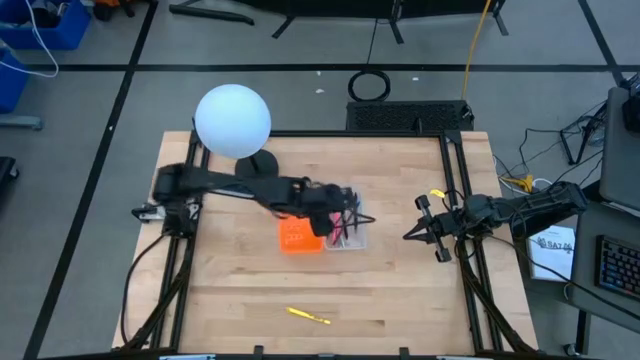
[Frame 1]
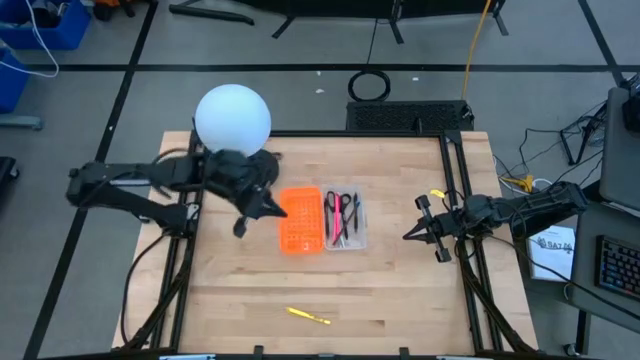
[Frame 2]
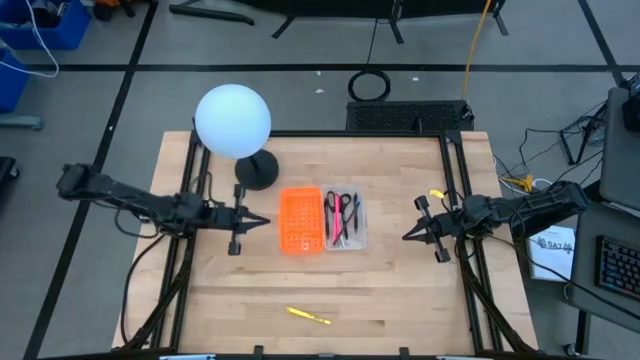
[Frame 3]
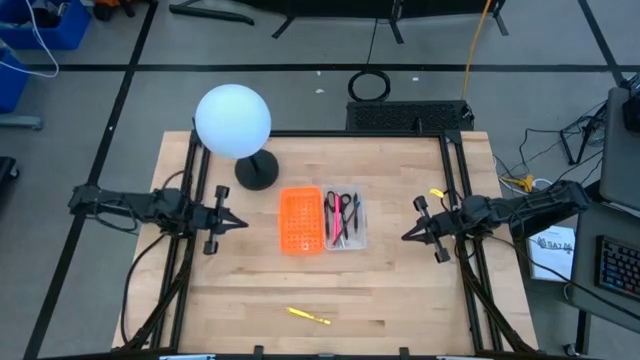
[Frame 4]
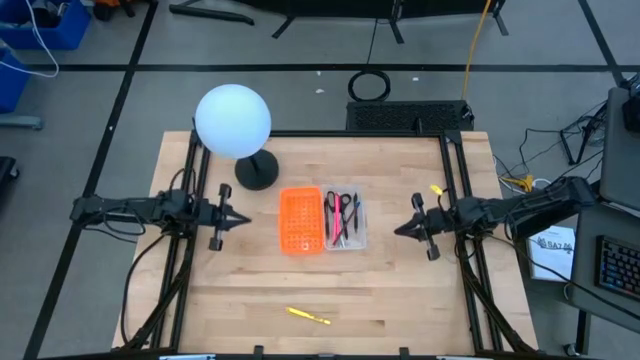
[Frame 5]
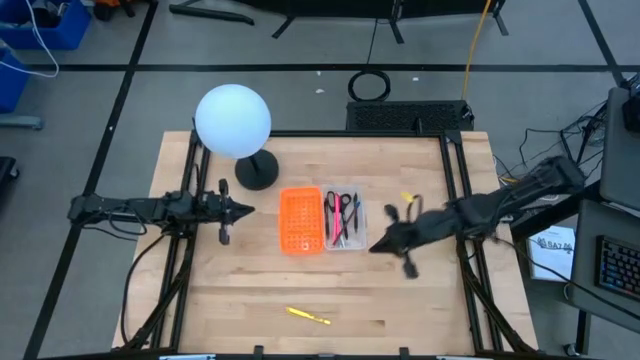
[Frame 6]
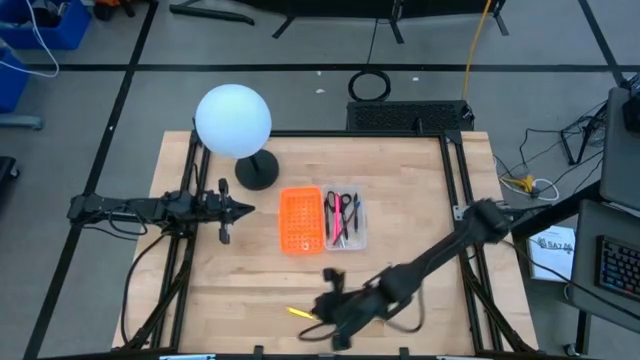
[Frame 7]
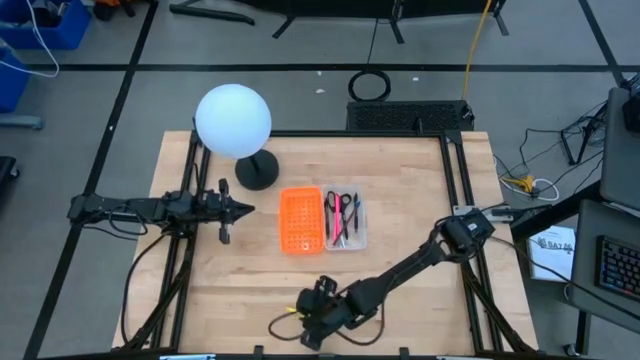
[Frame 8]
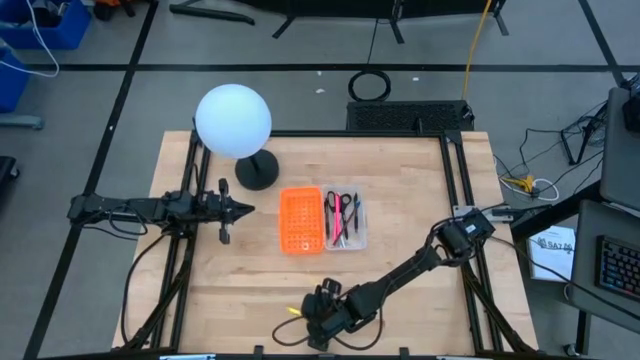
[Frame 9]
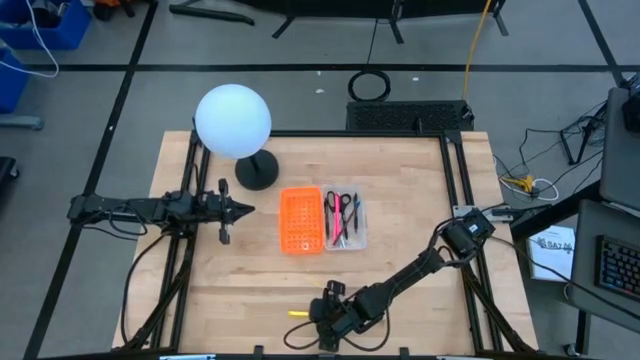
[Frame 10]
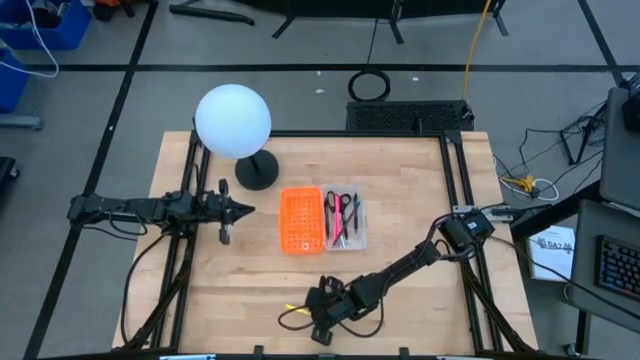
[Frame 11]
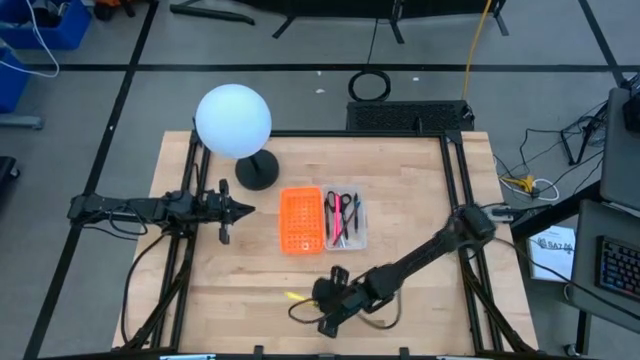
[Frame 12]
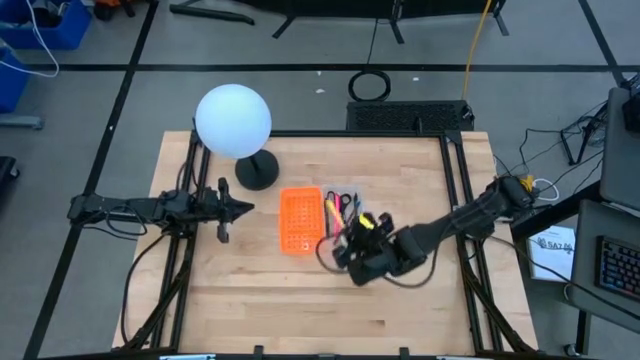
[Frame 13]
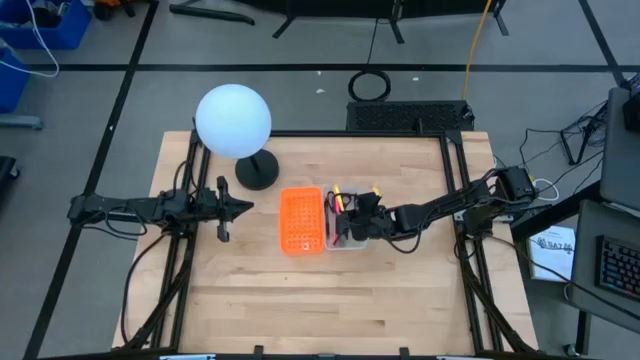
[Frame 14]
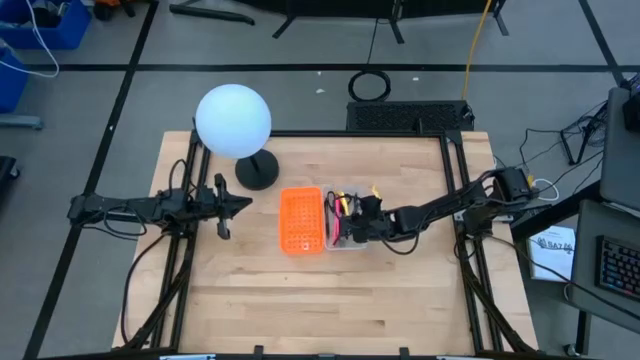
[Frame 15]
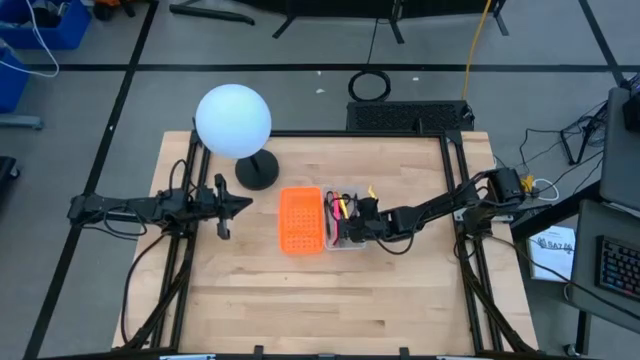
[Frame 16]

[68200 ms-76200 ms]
Task: Pick & place school supplies into a supply box
Put the yellow pen into the orange supply box

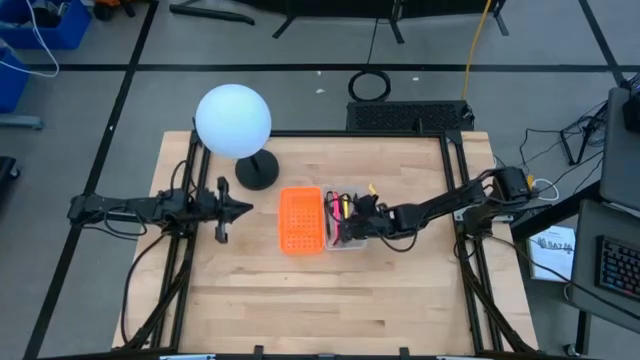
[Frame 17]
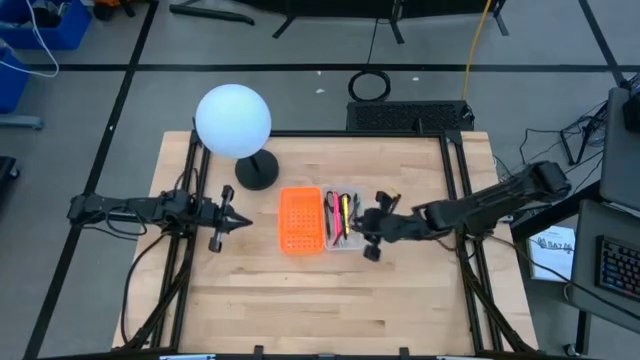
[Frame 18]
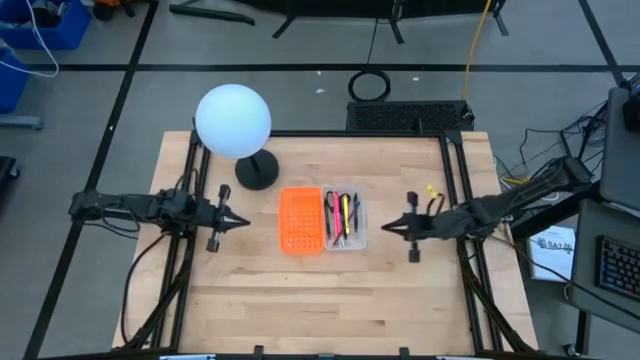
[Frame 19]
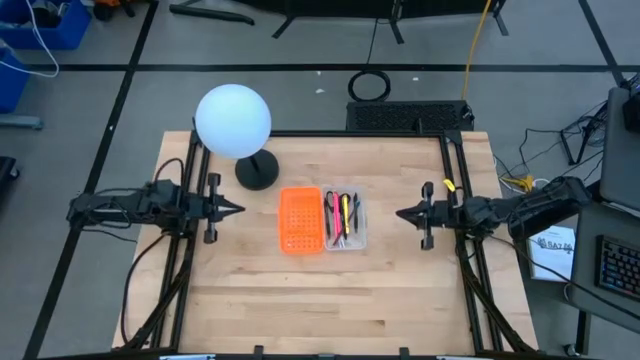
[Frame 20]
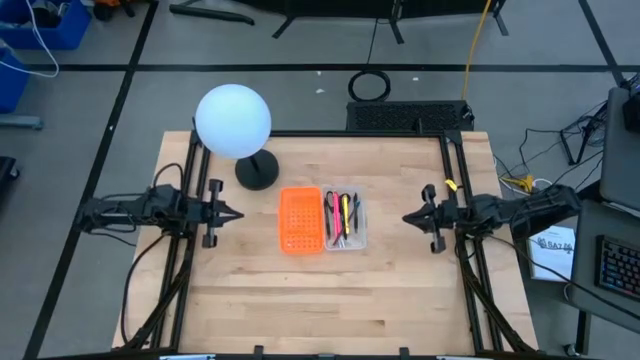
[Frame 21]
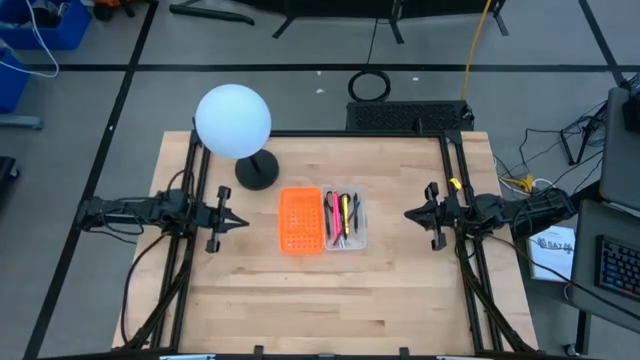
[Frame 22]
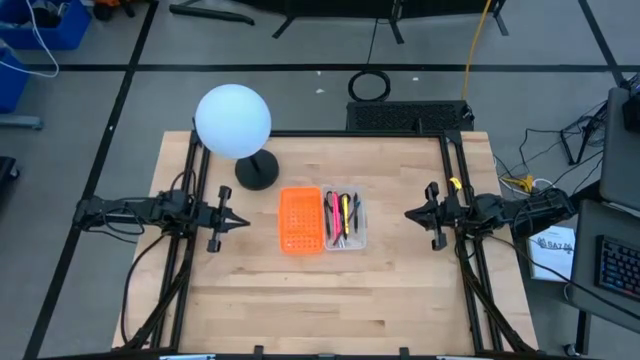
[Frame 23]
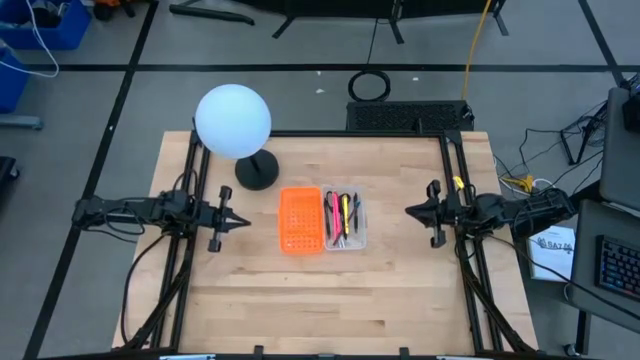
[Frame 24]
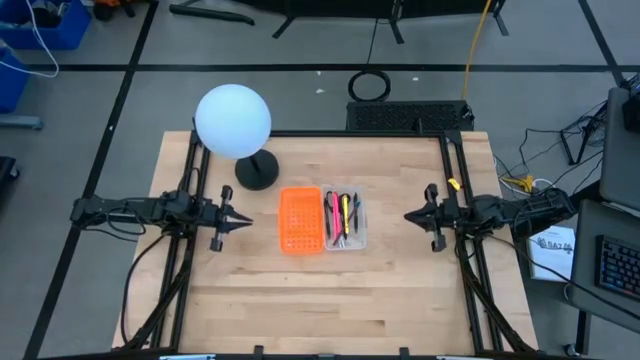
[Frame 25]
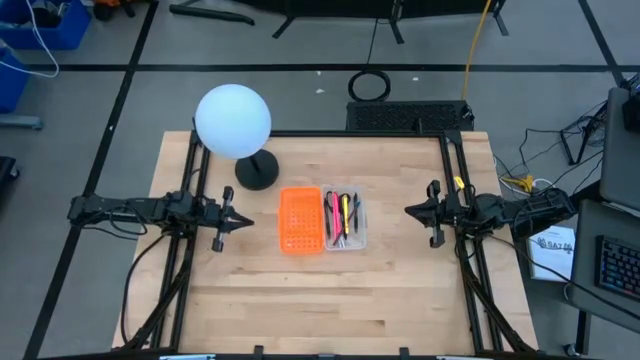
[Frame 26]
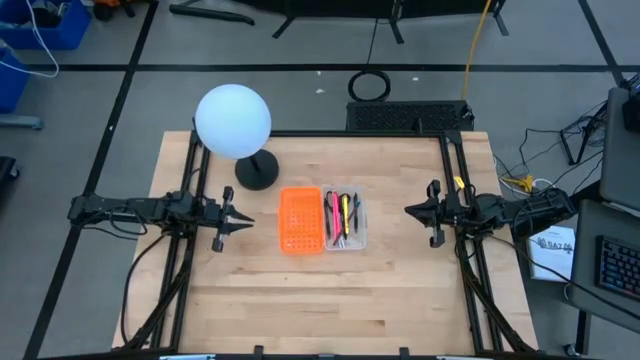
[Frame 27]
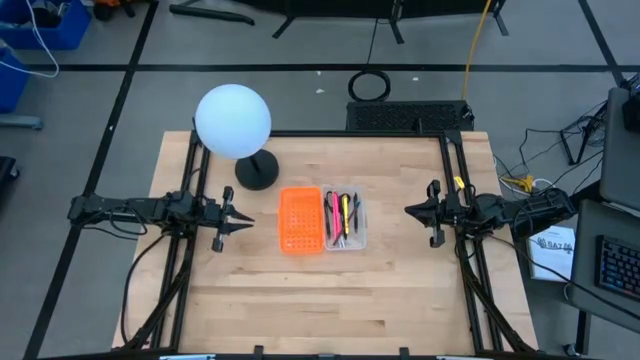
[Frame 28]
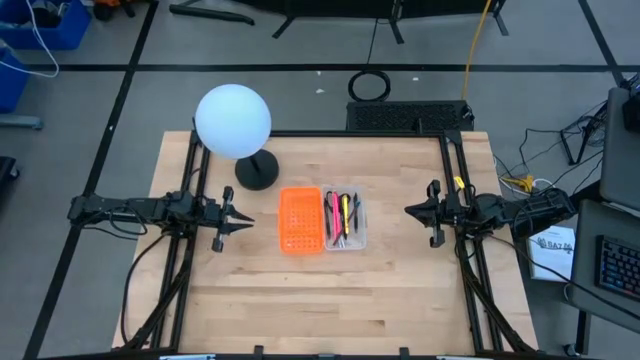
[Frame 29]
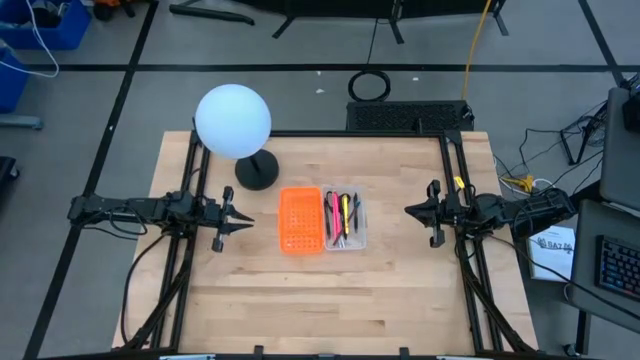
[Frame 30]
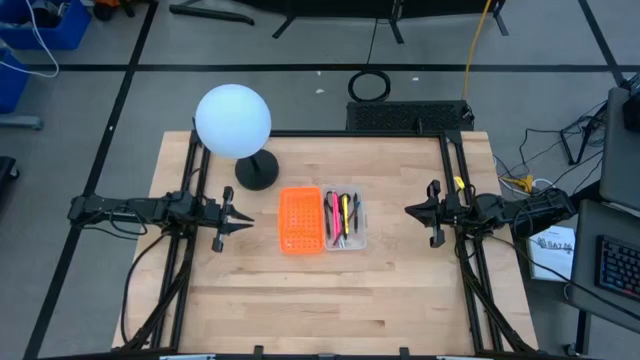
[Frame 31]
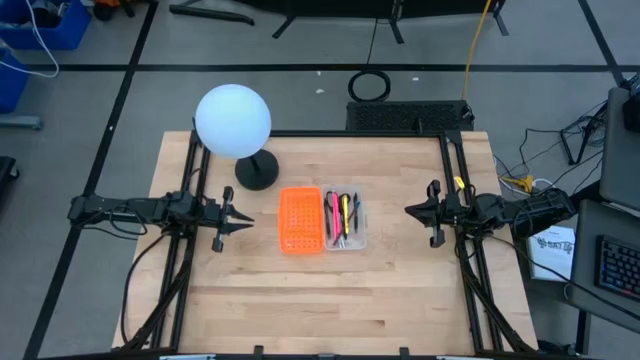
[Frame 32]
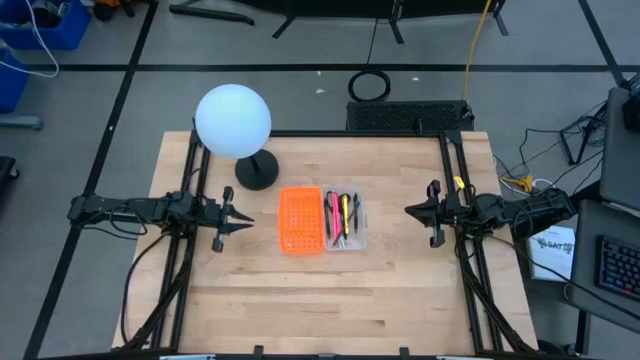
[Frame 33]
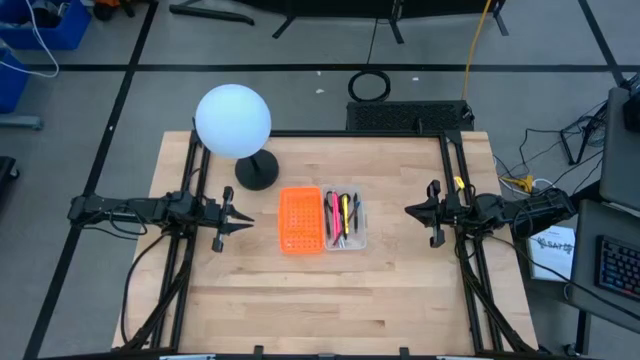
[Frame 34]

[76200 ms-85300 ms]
Return to Home Position

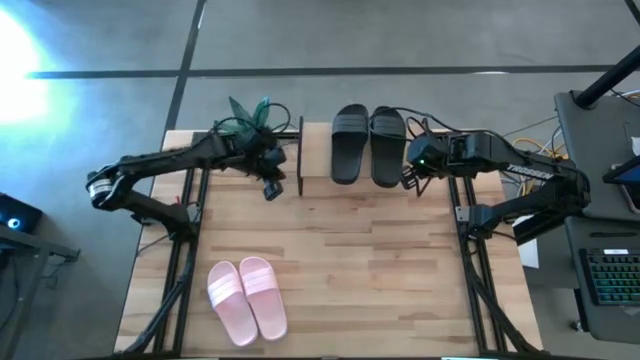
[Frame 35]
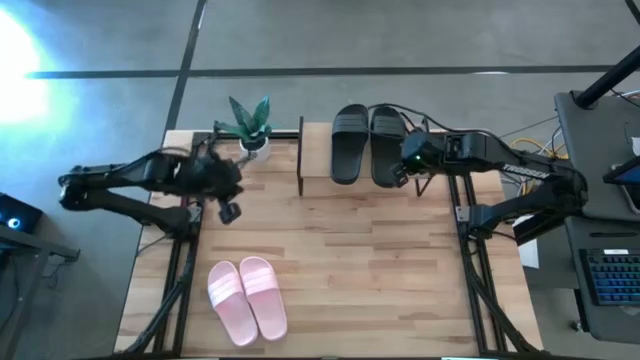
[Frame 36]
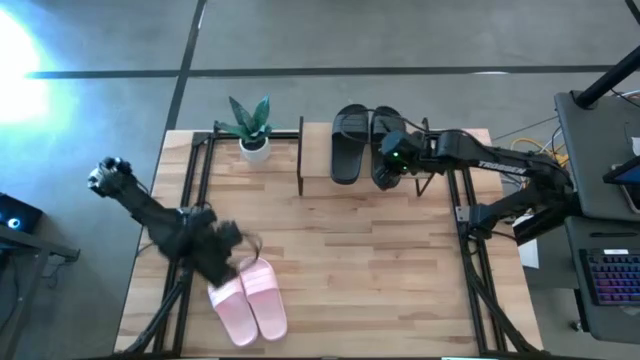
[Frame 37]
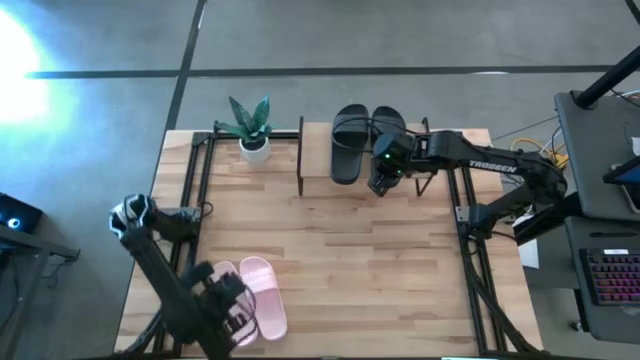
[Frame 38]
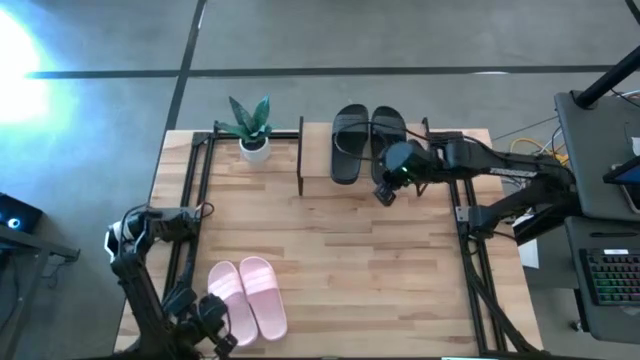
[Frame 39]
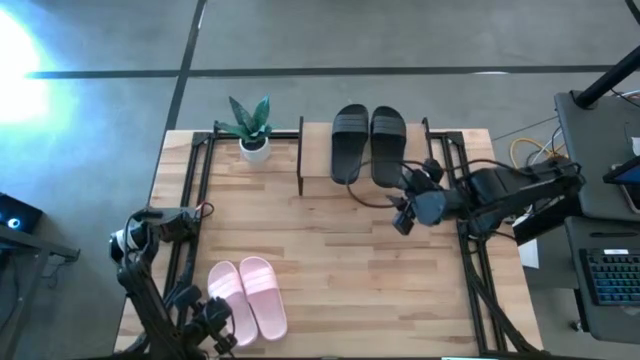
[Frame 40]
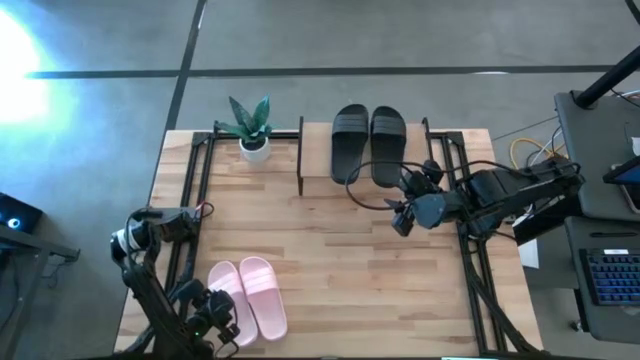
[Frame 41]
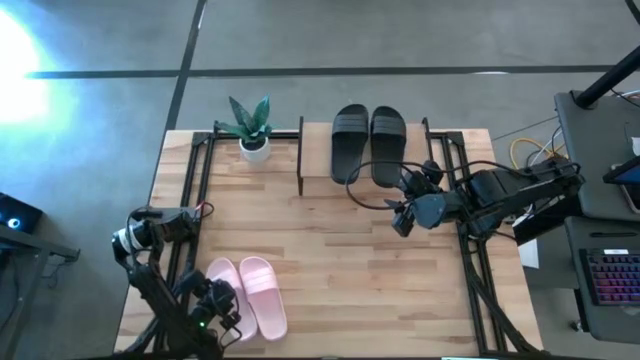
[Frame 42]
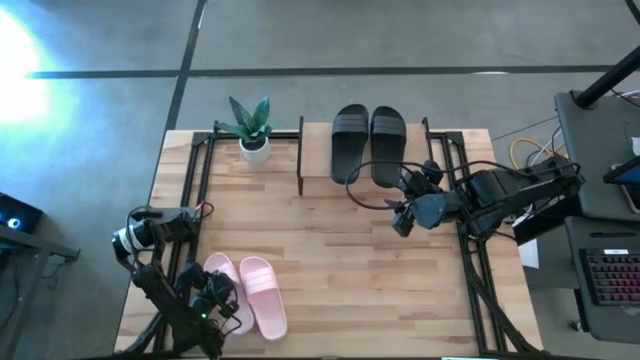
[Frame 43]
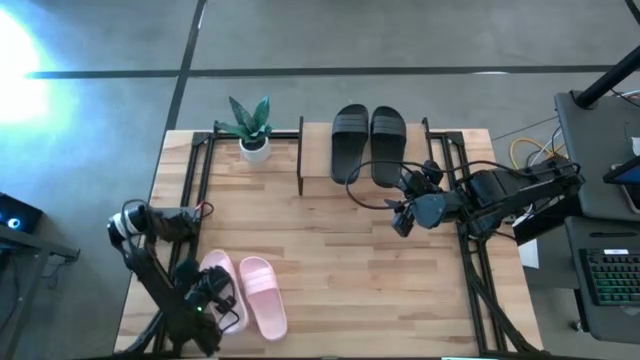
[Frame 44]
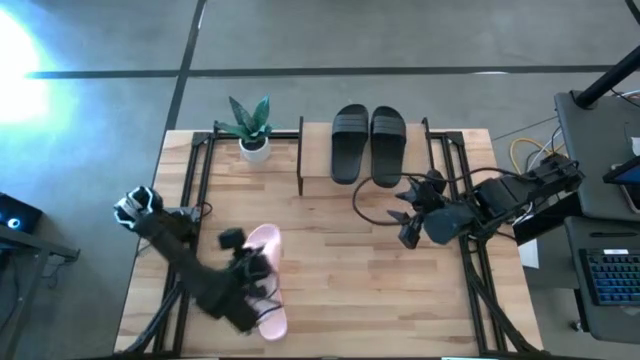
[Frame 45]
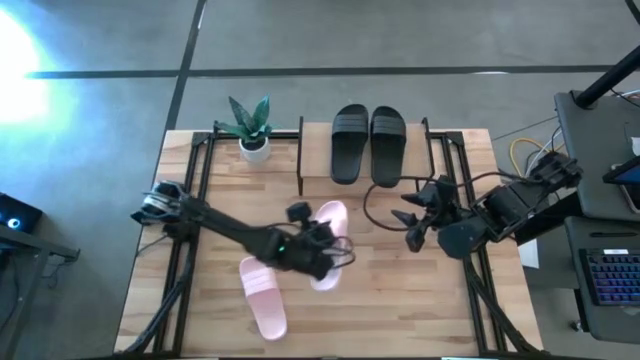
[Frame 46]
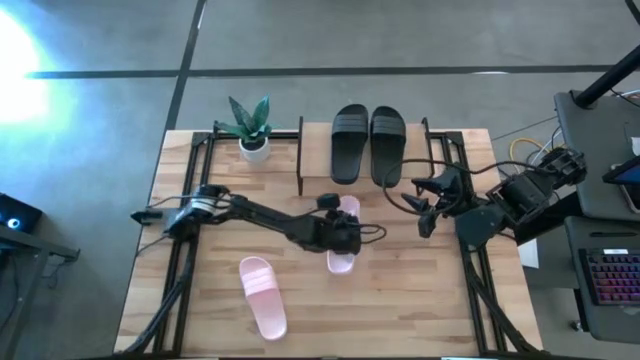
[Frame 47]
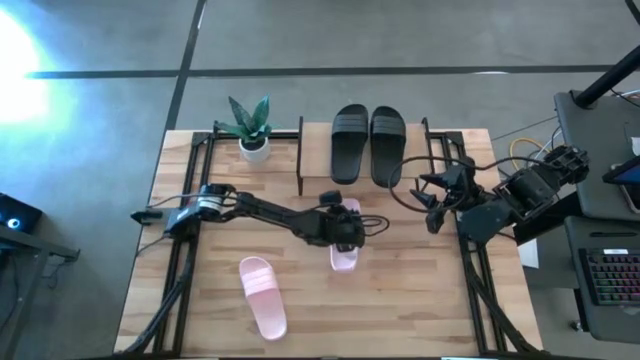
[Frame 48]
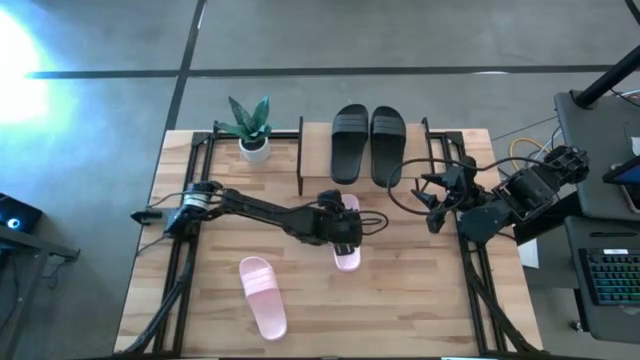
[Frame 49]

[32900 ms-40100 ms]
Task: Pick and place slides into the shelf
Put the left pink slipper under the shelf
